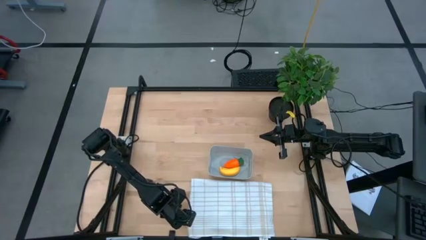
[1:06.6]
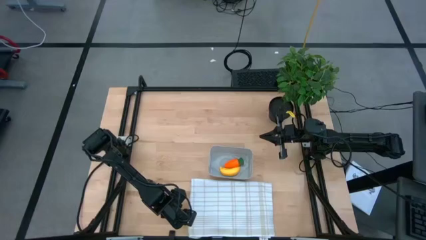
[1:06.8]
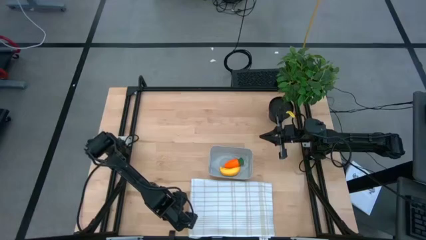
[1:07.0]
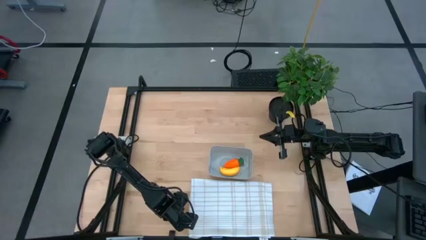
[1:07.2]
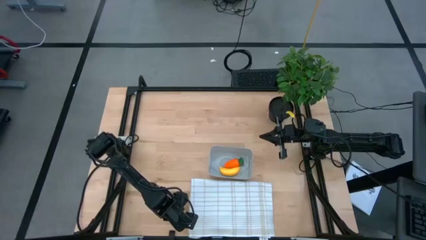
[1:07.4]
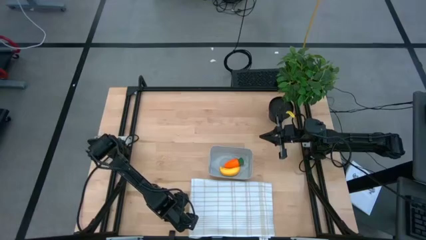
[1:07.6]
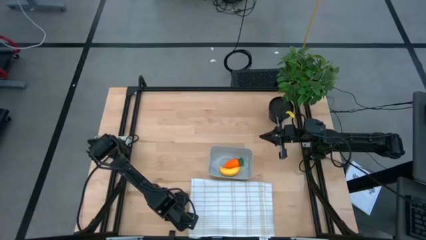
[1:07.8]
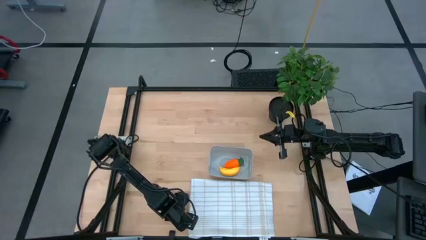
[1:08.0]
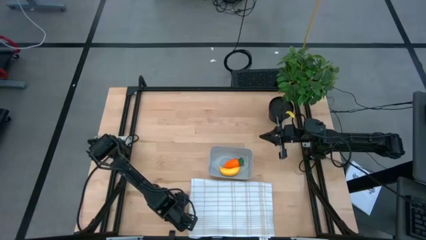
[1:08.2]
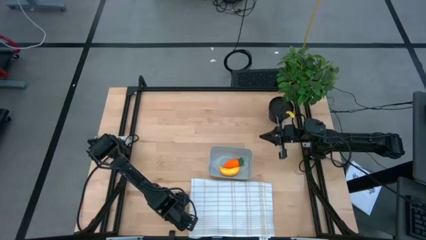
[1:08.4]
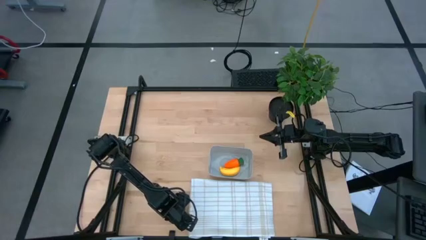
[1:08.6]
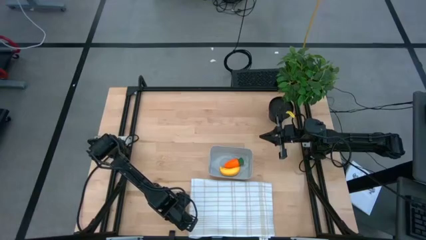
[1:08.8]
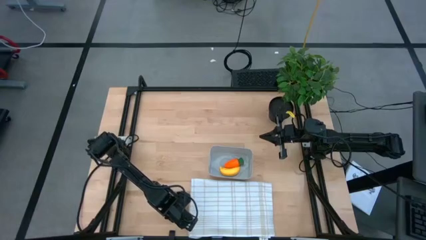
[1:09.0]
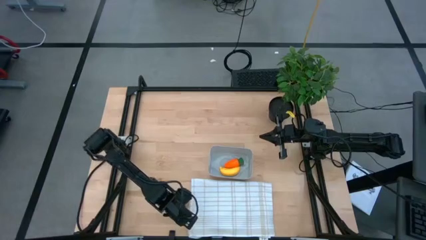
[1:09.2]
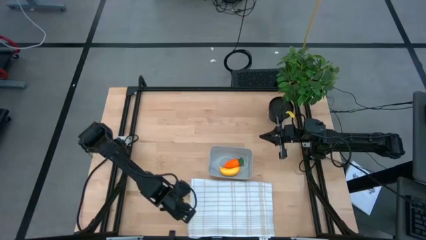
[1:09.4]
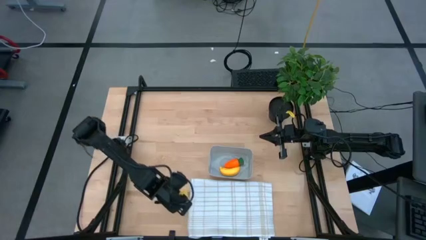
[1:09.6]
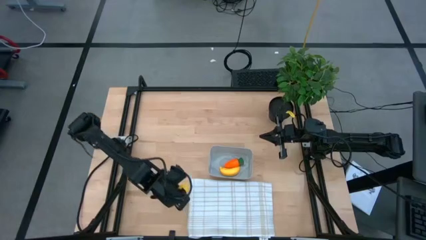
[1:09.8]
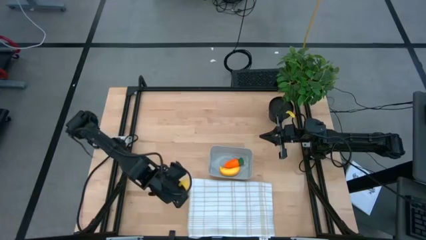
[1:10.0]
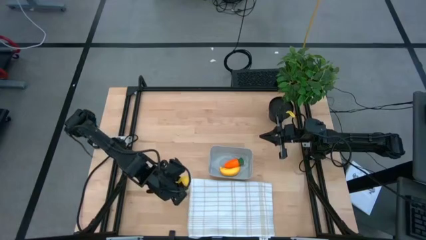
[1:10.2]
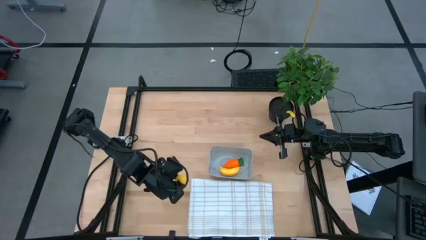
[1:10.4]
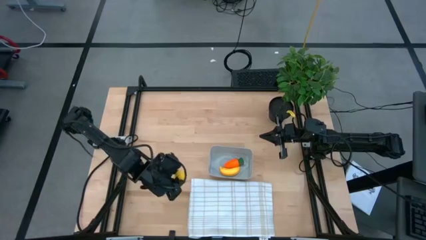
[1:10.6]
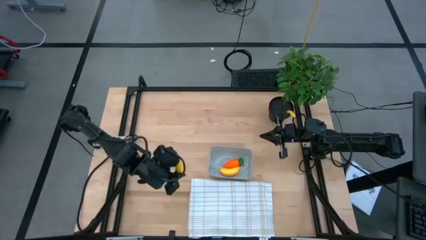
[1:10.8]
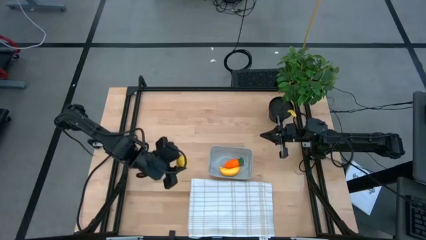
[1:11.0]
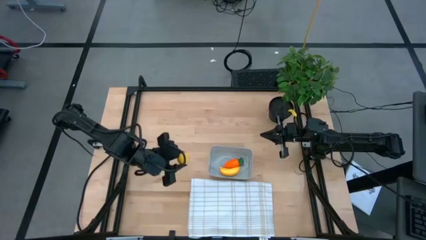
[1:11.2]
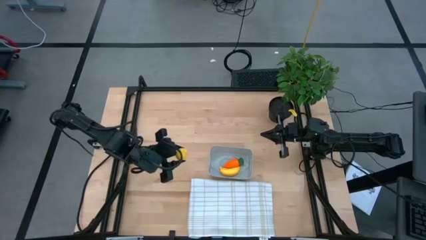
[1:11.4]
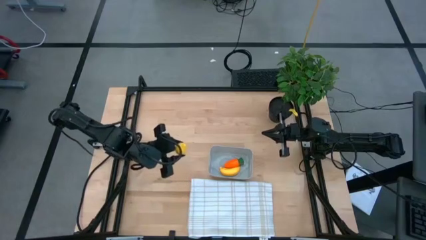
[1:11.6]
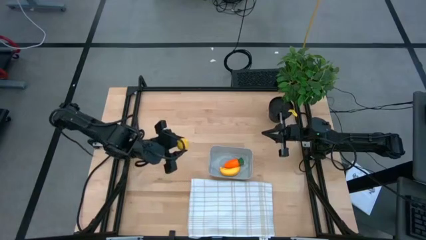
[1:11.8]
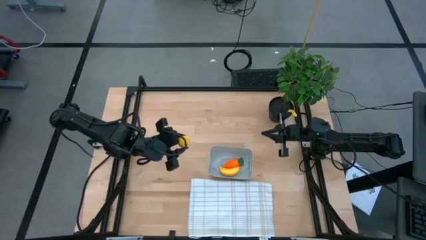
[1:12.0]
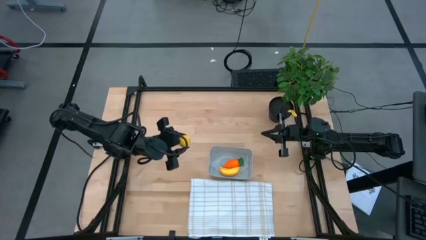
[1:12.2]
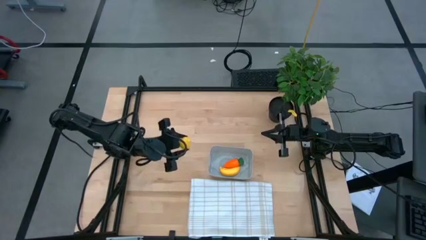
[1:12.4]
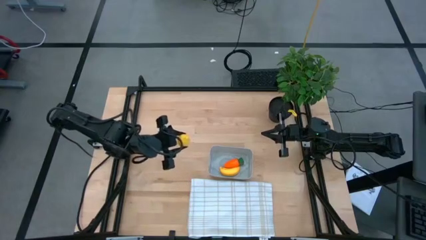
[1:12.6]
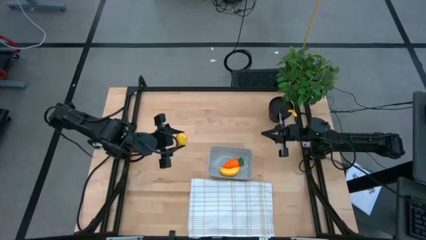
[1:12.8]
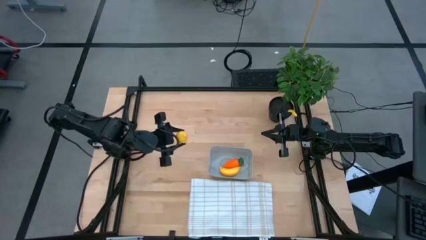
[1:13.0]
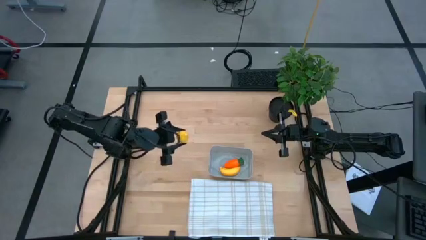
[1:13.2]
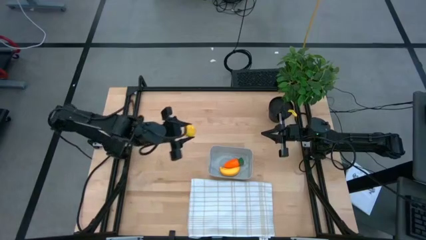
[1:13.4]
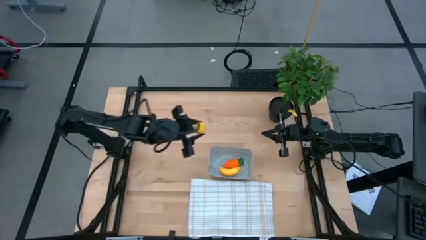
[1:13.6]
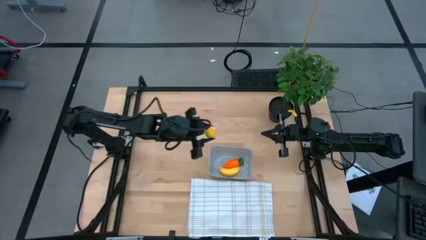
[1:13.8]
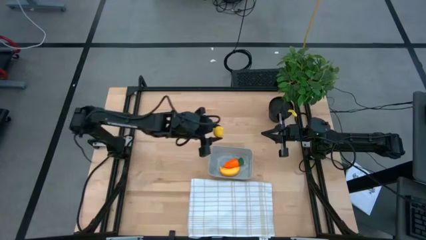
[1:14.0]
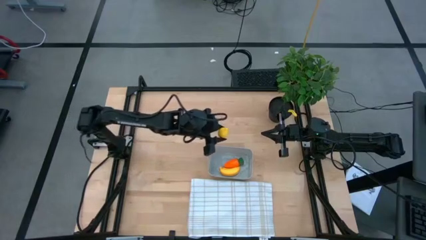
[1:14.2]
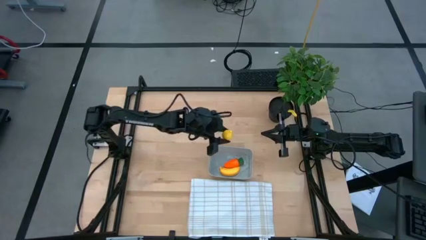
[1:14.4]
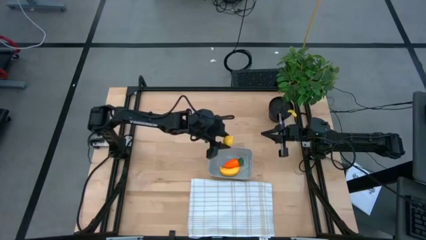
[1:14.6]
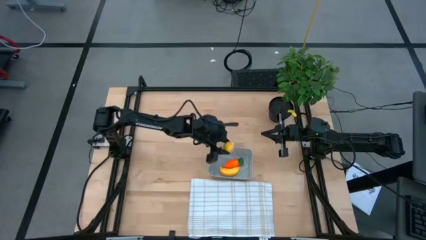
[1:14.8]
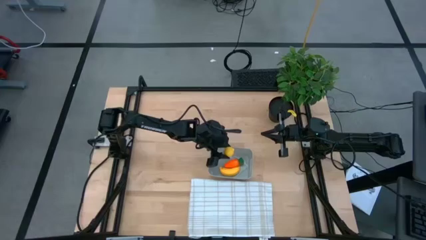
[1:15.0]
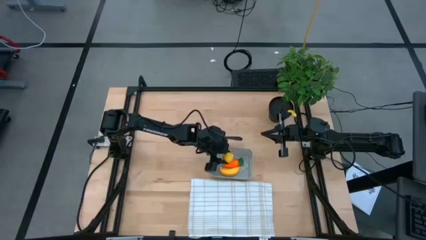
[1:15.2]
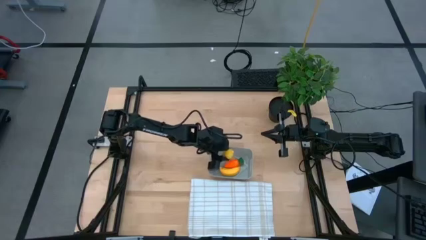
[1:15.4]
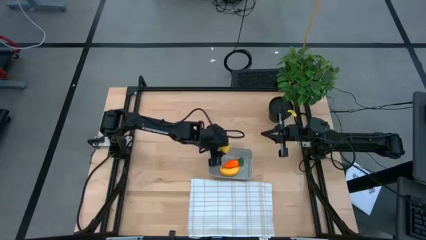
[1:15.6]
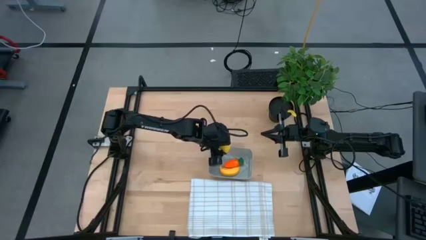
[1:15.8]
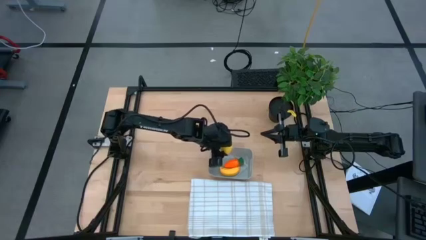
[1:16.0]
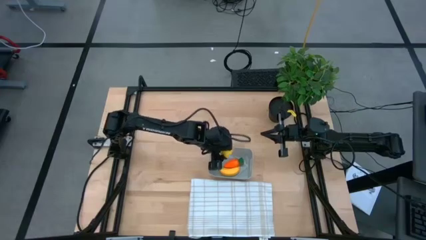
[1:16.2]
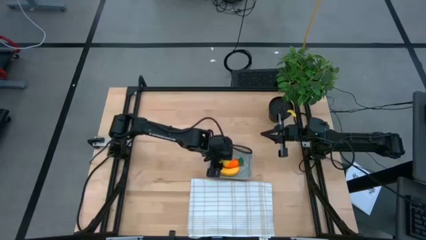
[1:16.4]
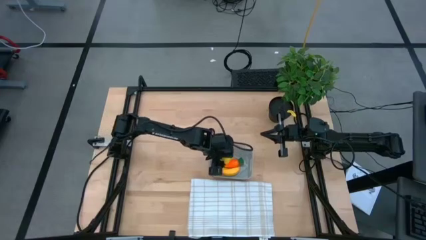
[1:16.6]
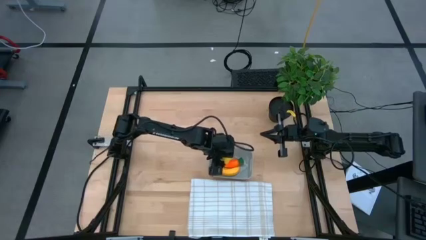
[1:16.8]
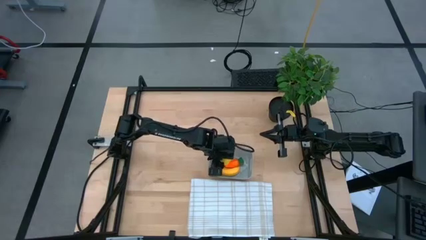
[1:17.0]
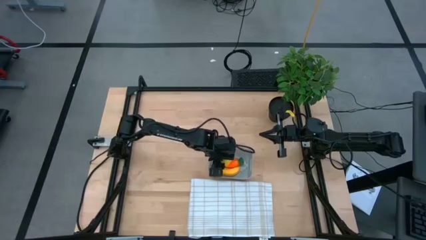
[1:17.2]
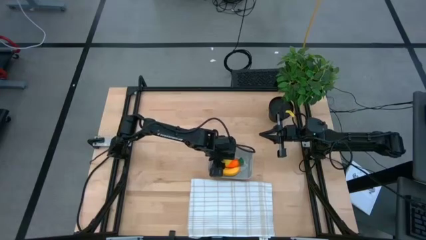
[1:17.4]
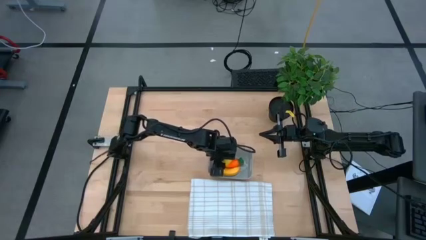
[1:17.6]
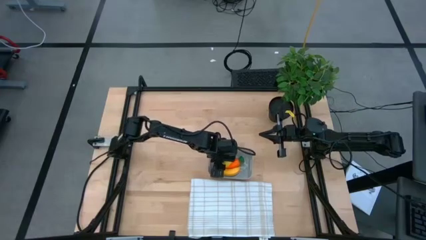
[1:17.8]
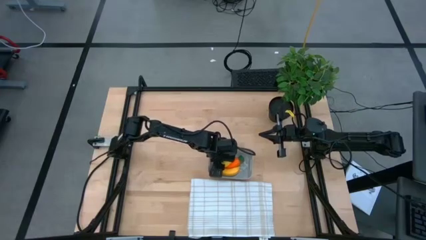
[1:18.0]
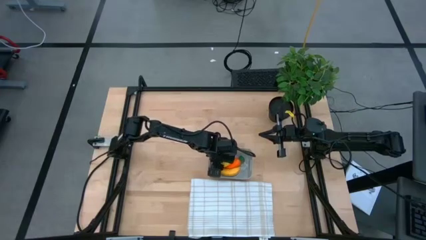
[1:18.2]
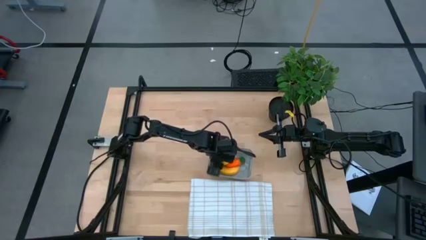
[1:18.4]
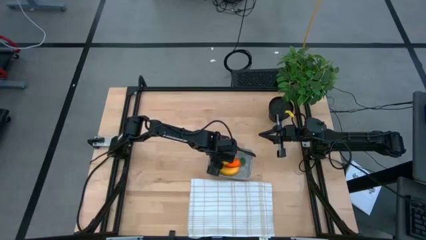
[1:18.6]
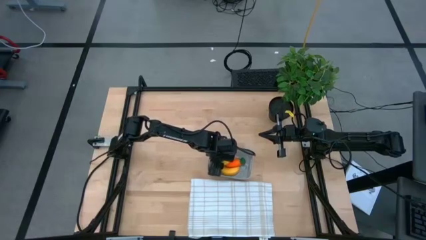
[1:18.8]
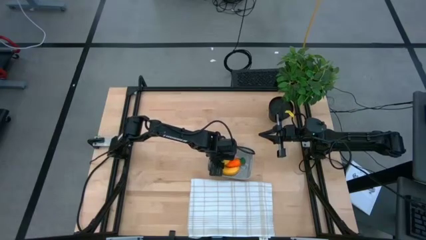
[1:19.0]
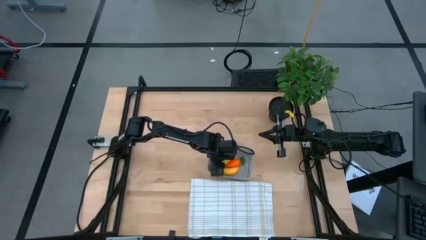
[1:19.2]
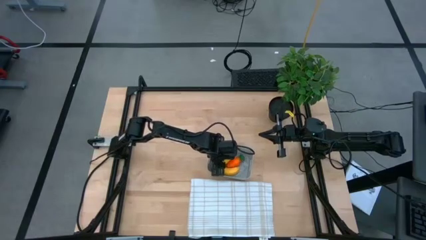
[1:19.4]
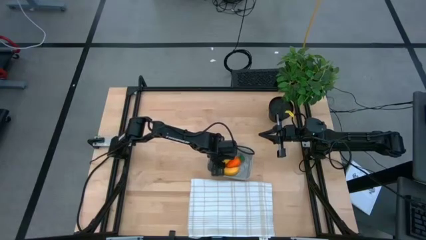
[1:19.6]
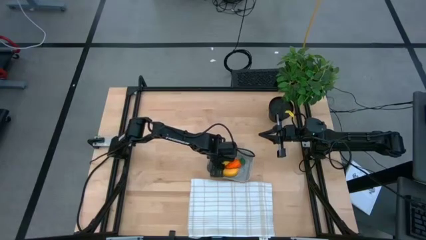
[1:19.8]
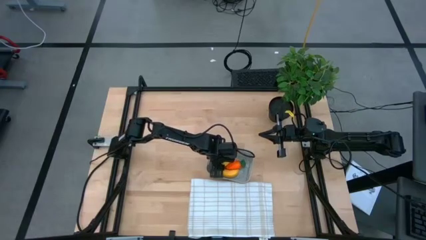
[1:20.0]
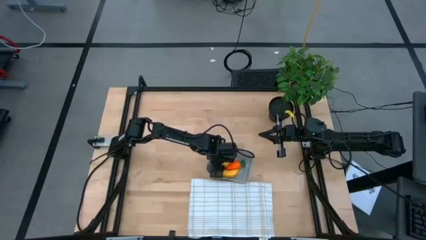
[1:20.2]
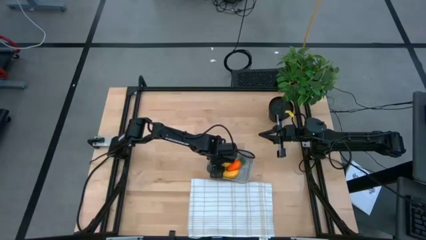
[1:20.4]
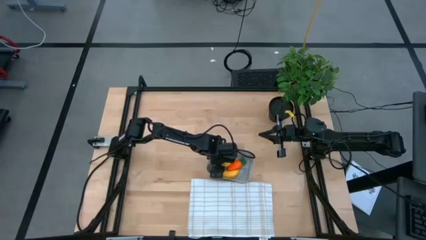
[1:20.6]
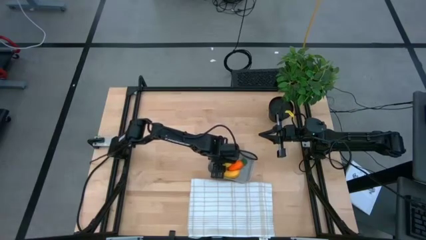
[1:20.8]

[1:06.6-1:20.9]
Task: Pick and placing Produce into tupperware
Put the yellow lemon into the gray bin
